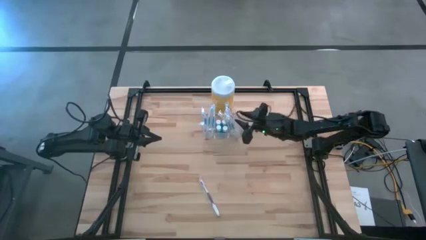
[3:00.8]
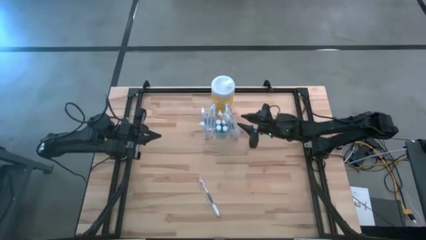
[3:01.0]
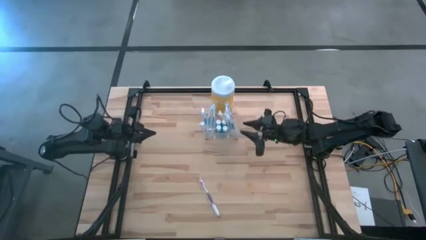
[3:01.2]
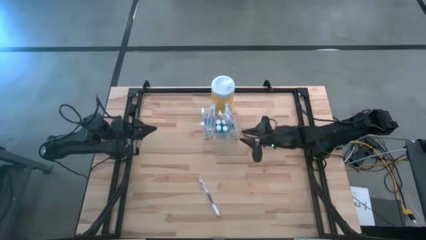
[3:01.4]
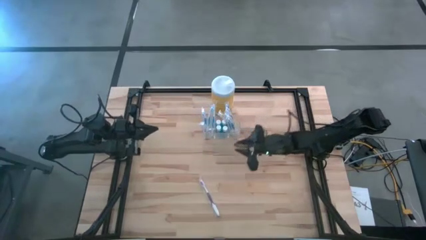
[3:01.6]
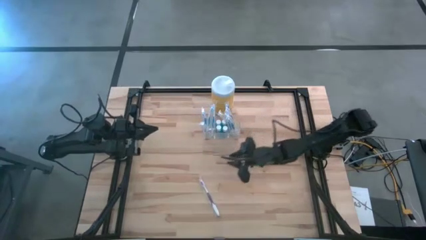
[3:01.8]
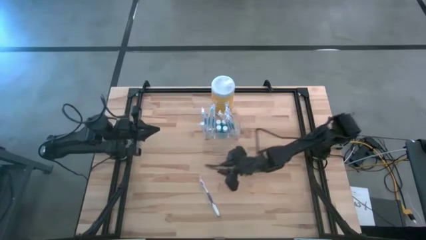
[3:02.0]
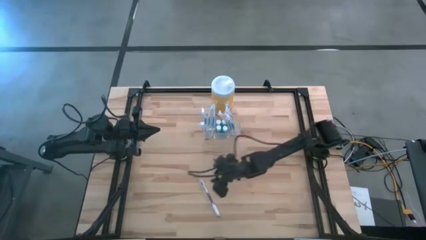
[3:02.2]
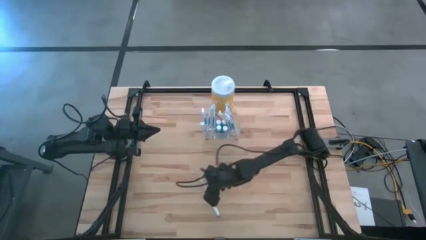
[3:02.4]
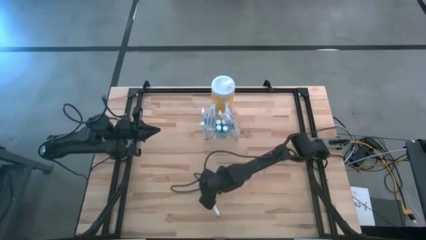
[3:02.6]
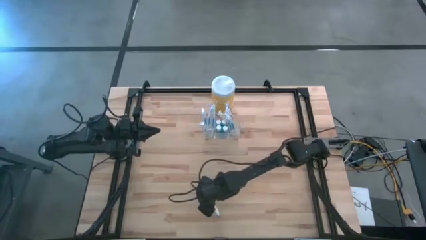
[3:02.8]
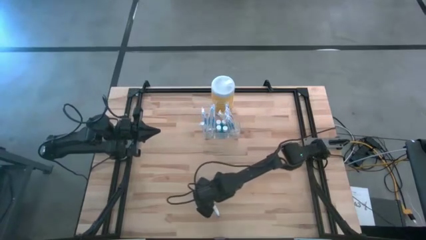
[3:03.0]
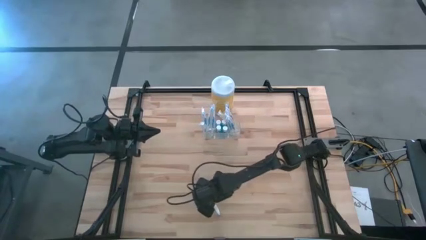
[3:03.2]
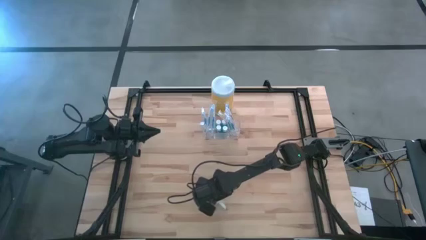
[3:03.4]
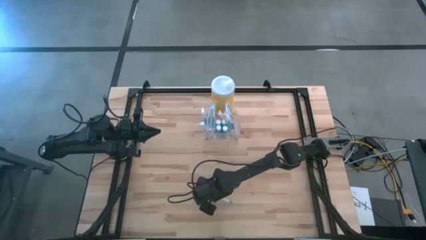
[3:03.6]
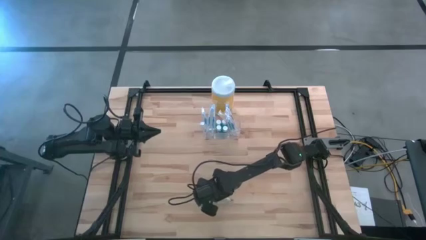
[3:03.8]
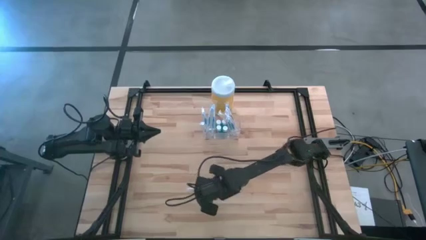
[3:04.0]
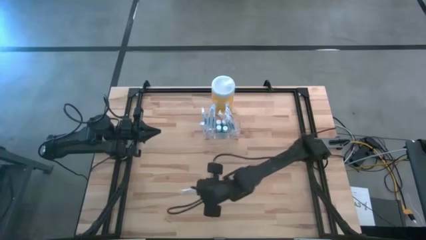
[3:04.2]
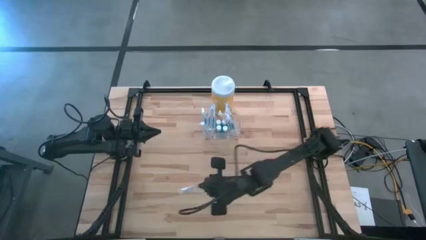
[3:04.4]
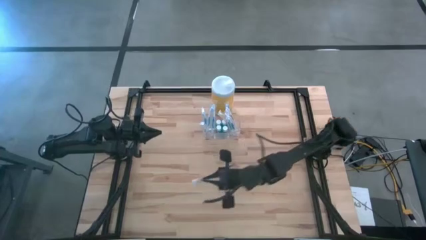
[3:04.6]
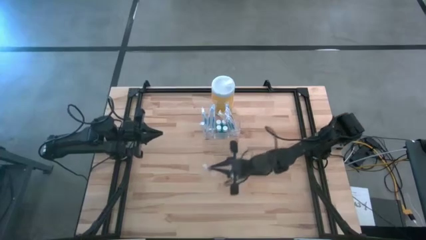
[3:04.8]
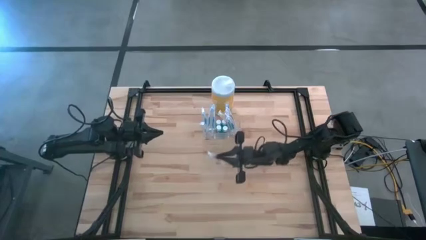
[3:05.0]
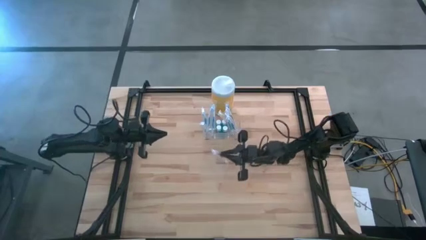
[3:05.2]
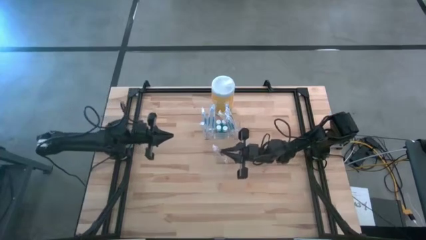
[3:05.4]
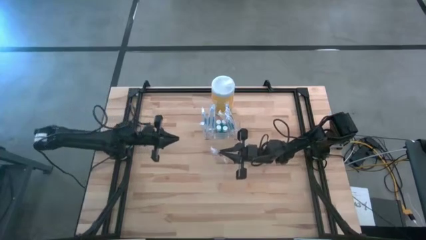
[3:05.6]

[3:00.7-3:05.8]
Task: Pick & Place toothbrushing station
Put the violet toothbrush into the transparent organizer

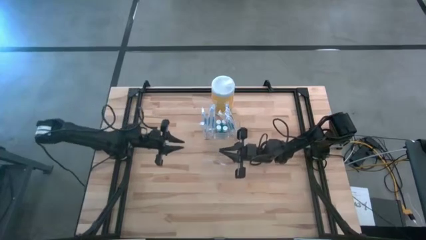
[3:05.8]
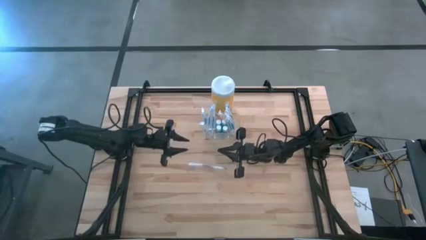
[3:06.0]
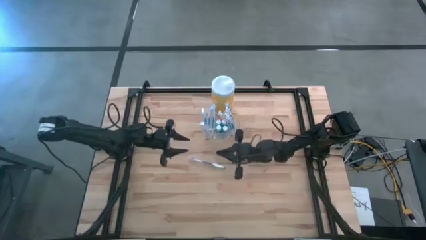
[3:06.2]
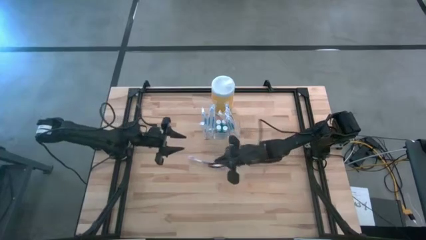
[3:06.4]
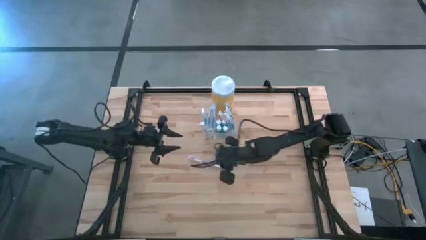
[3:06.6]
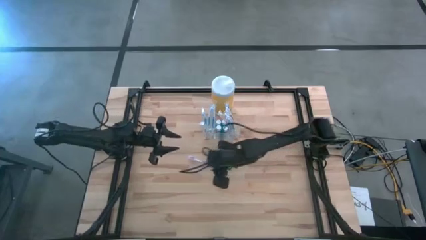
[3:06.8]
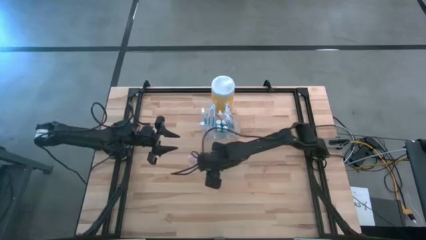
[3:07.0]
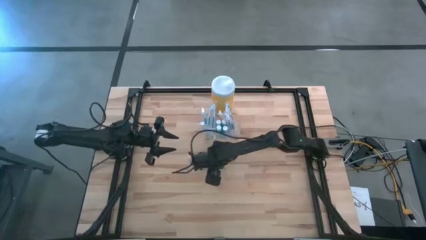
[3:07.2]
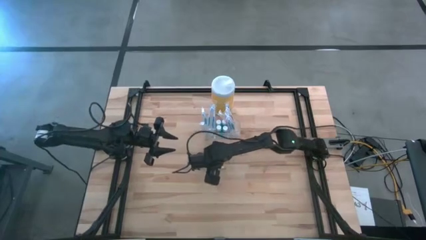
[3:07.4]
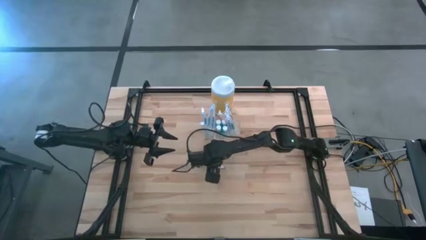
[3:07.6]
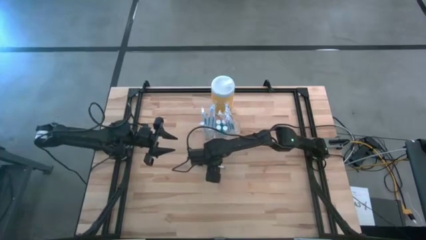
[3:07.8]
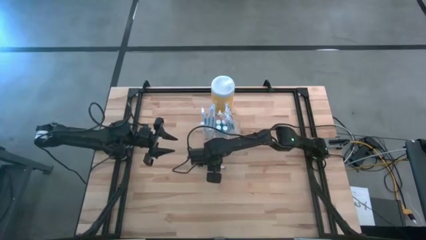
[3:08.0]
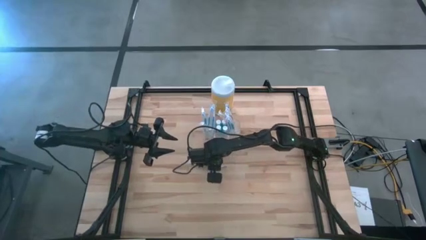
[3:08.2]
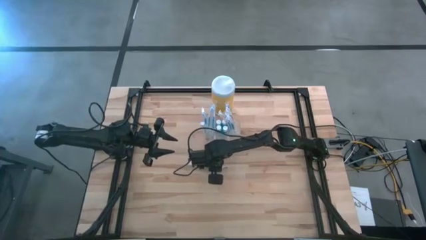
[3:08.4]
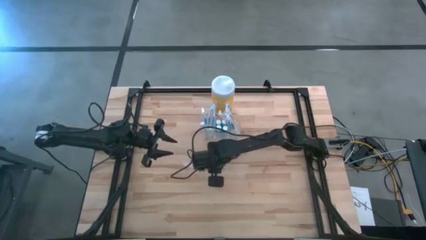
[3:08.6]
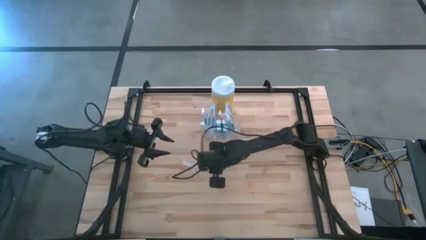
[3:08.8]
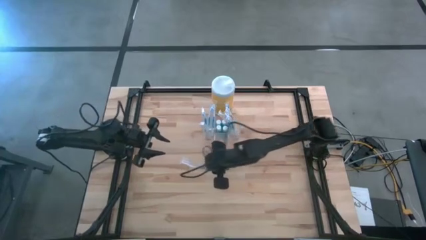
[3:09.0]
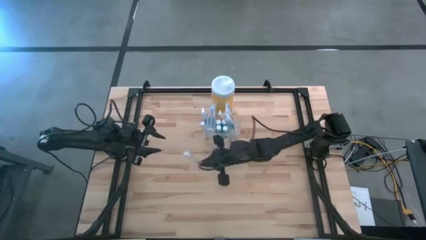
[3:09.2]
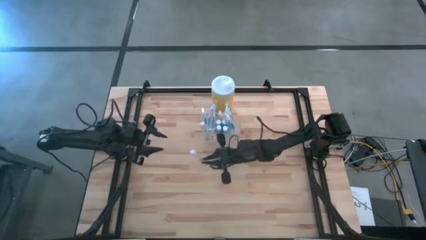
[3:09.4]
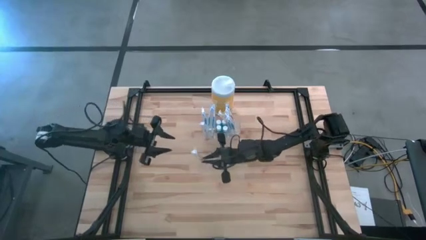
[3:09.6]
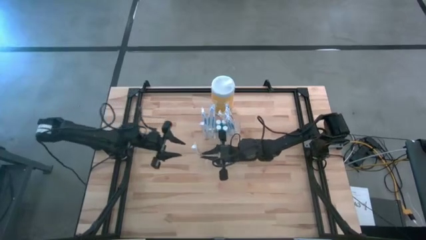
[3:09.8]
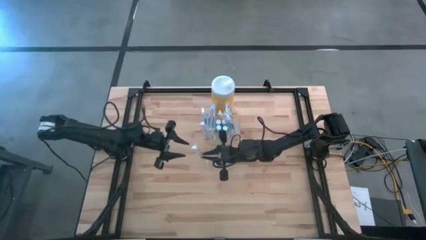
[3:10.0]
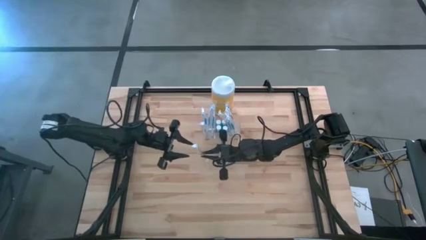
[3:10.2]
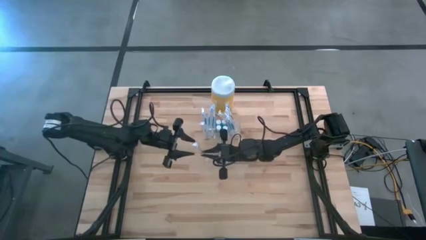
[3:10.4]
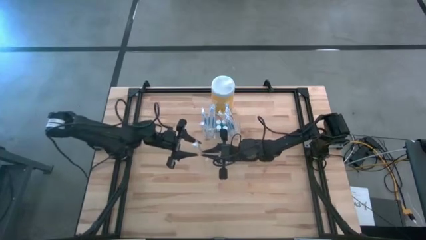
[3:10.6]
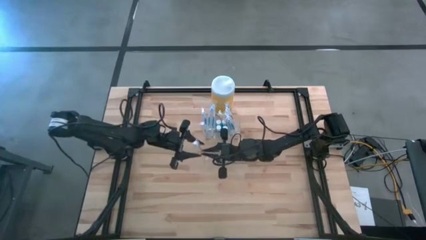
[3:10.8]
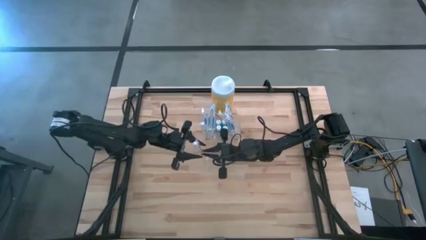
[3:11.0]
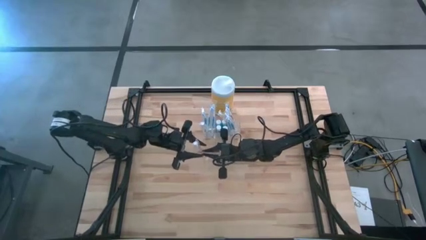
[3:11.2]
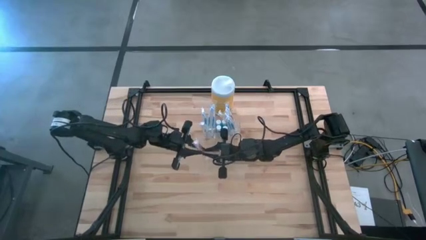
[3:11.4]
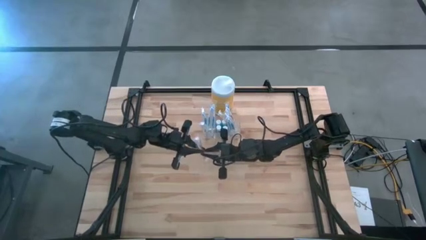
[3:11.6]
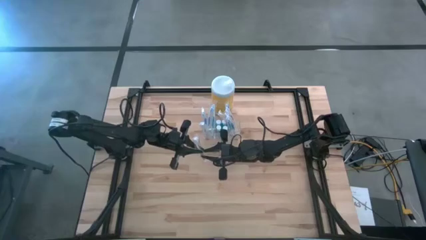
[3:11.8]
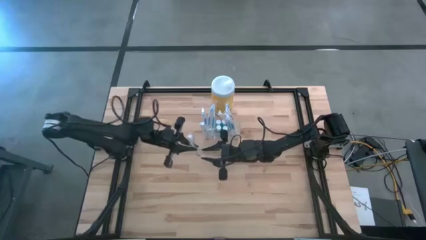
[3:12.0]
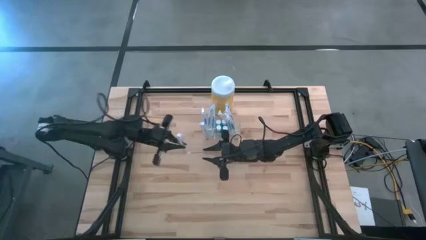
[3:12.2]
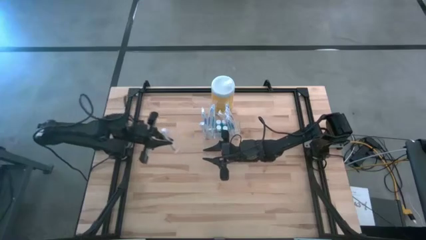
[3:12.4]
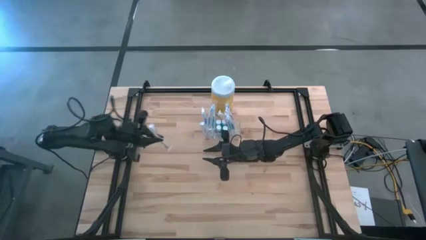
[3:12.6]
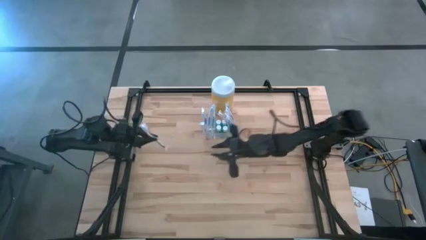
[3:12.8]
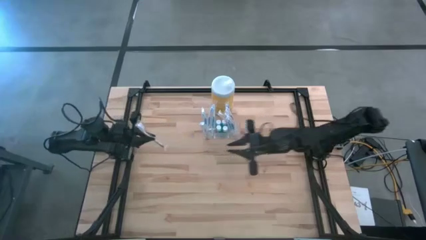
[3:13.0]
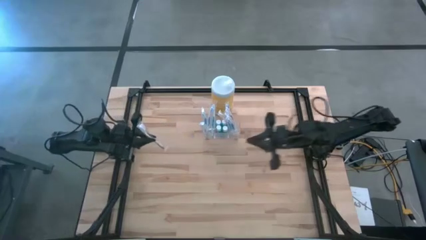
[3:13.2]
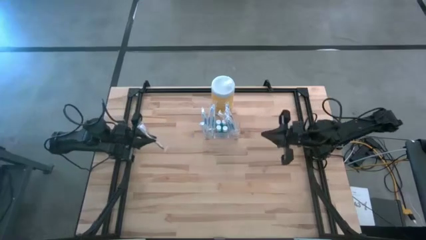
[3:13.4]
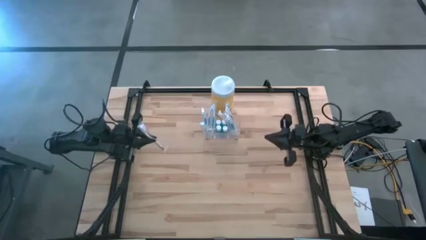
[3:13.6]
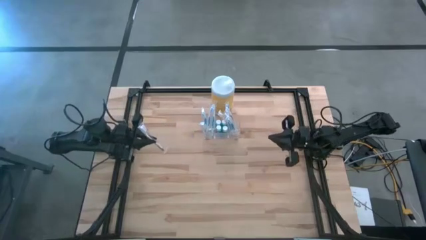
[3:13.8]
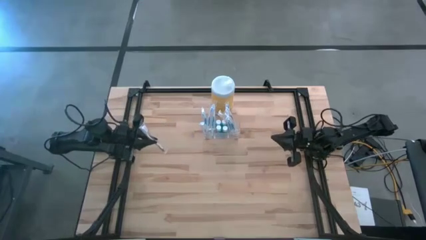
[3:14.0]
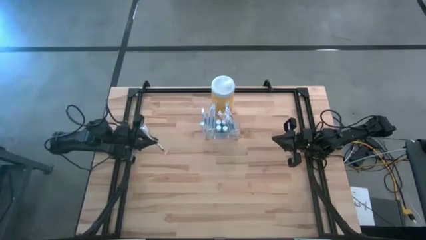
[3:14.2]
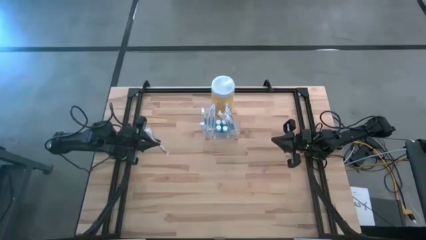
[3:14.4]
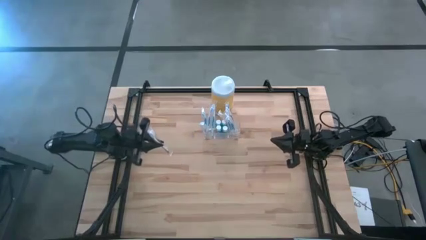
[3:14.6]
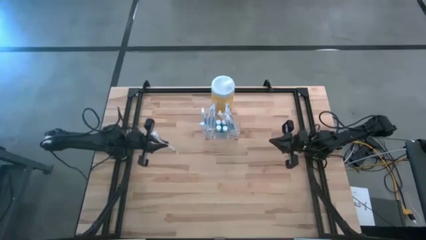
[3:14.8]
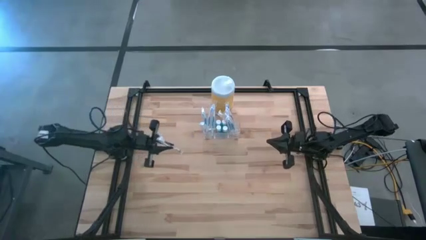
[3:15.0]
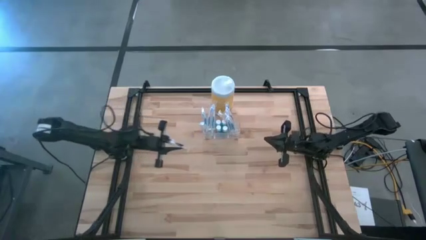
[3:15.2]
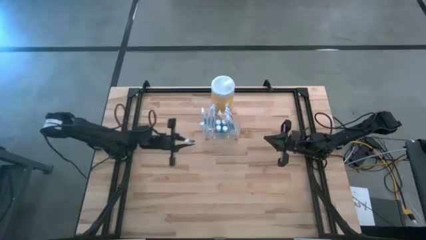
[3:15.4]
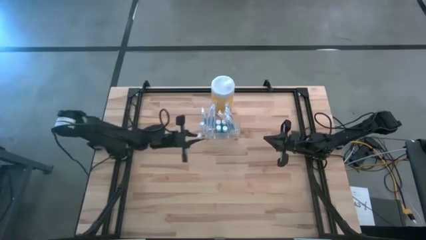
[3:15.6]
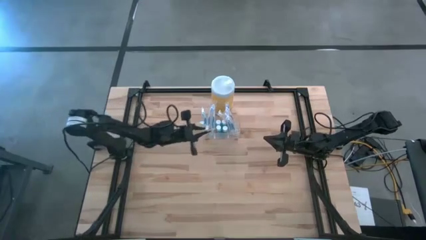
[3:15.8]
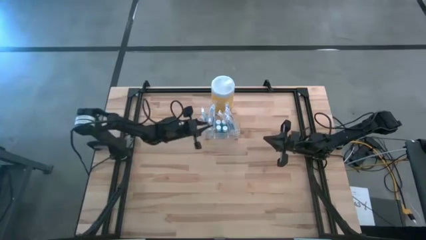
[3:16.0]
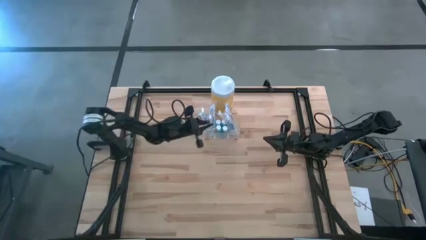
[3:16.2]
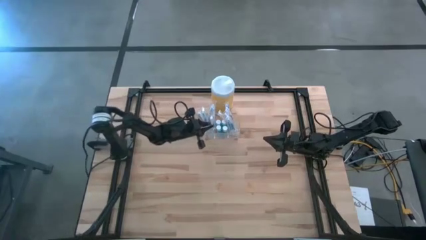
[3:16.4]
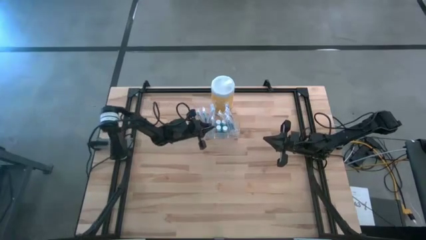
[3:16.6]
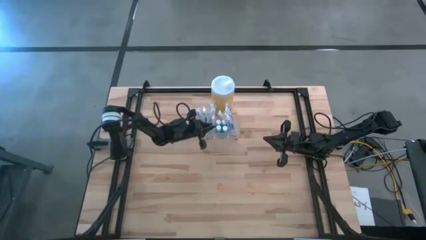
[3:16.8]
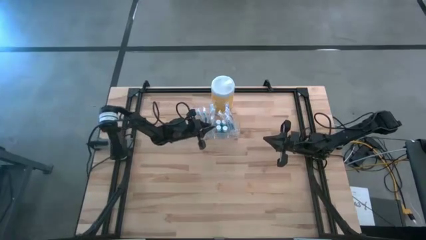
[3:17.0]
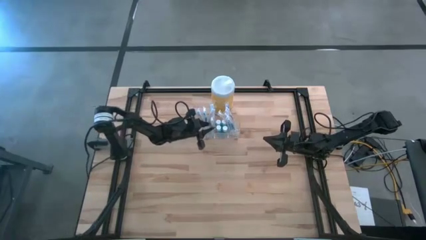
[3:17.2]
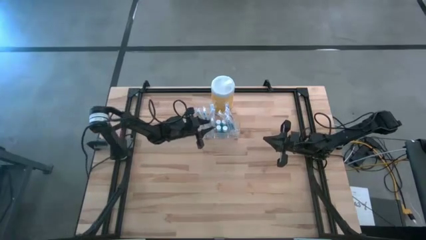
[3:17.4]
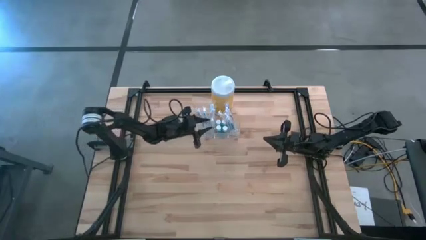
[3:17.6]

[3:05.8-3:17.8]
Put the violet toothbrush into the transparent organizer

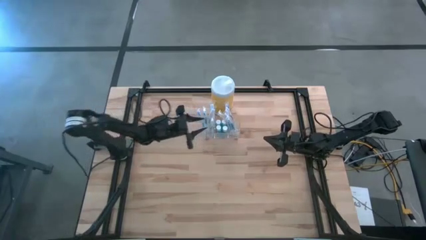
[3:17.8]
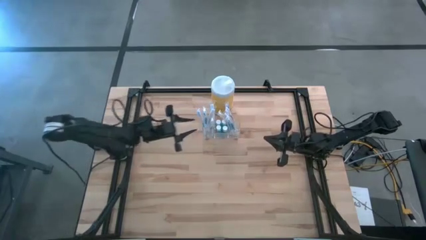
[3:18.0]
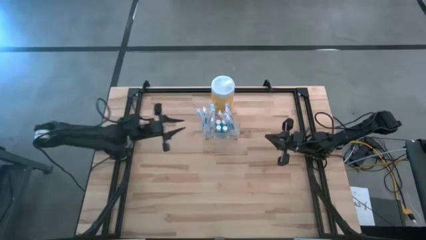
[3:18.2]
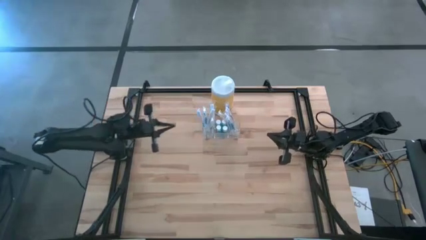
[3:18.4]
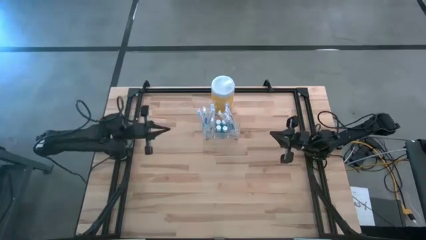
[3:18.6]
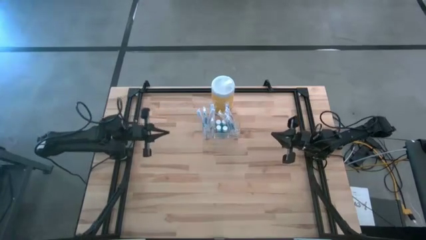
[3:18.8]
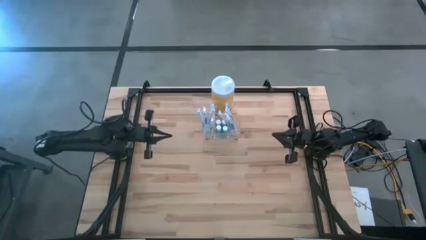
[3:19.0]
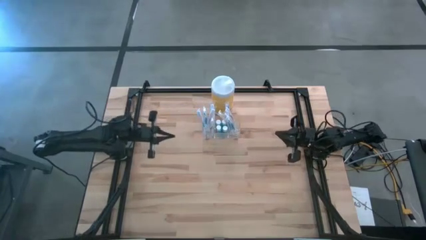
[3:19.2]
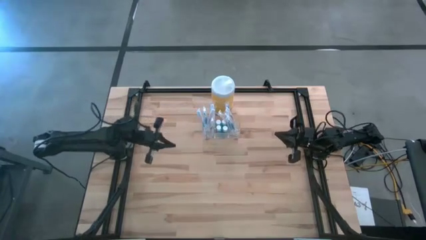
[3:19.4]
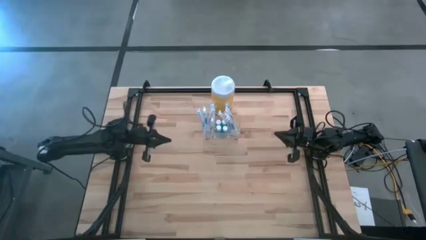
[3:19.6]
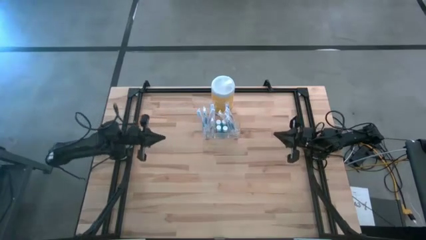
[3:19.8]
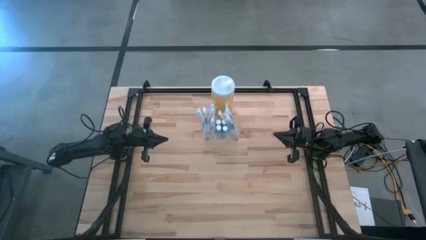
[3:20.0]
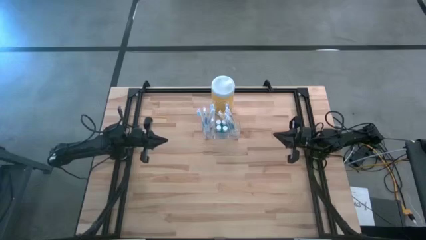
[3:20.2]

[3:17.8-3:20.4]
Return to Home Position
